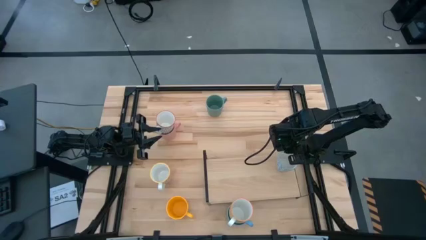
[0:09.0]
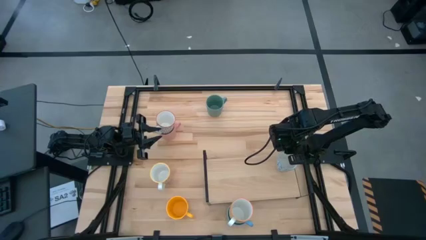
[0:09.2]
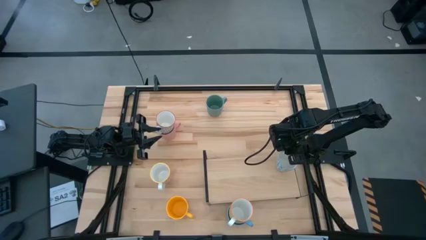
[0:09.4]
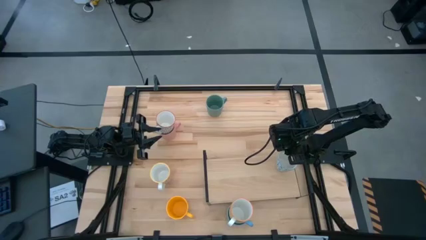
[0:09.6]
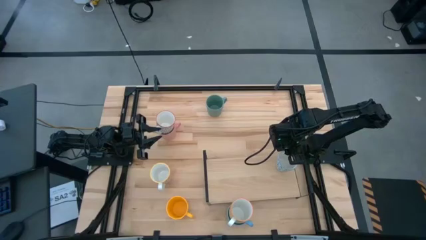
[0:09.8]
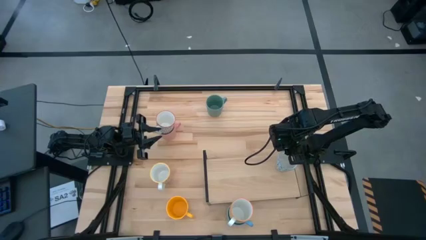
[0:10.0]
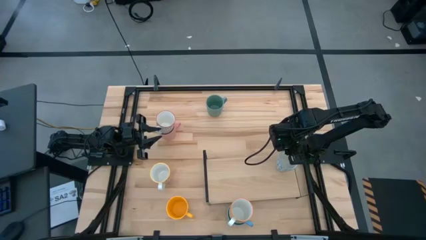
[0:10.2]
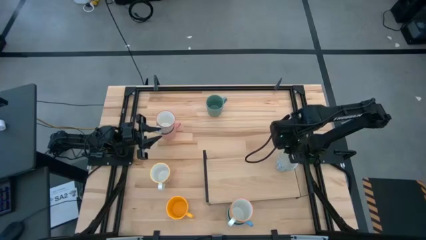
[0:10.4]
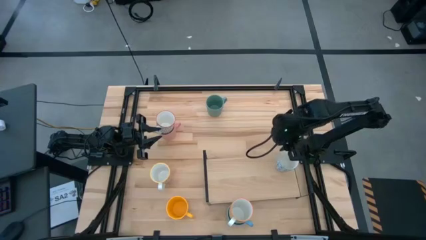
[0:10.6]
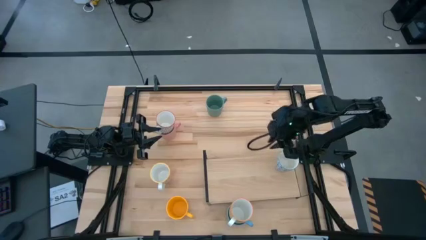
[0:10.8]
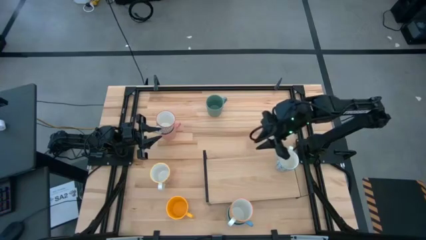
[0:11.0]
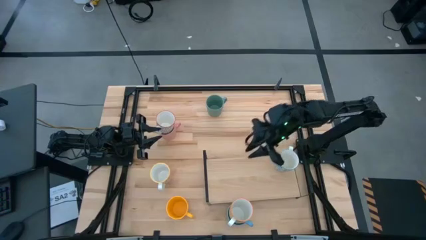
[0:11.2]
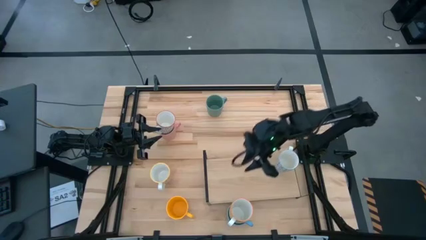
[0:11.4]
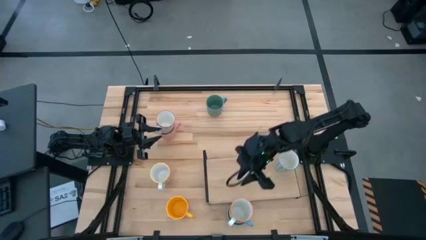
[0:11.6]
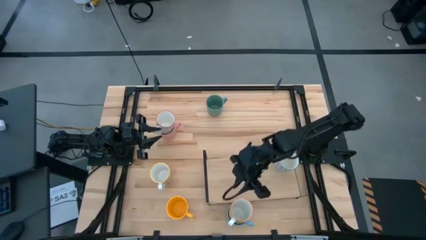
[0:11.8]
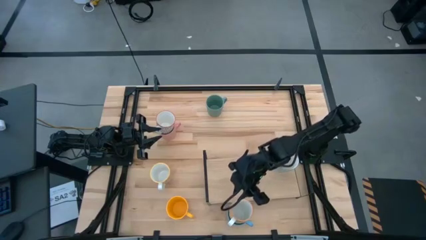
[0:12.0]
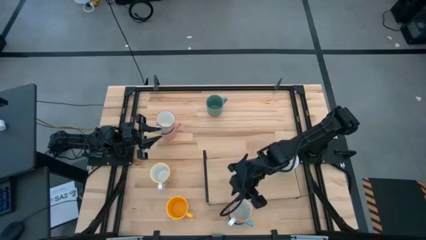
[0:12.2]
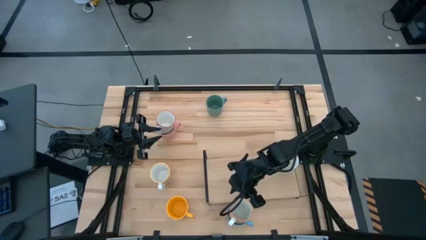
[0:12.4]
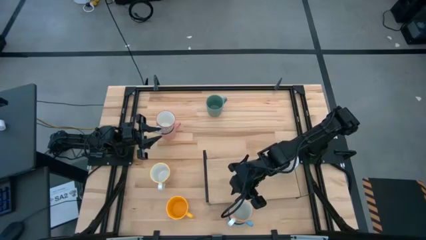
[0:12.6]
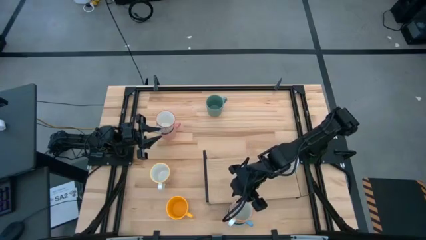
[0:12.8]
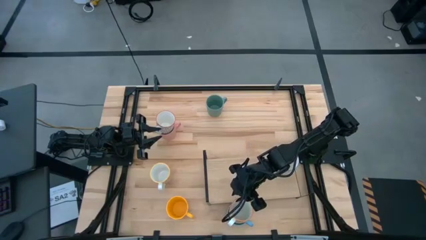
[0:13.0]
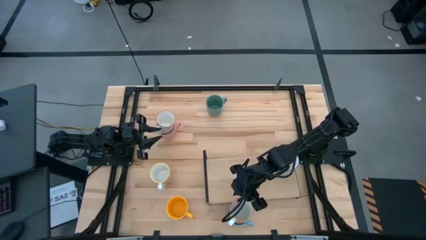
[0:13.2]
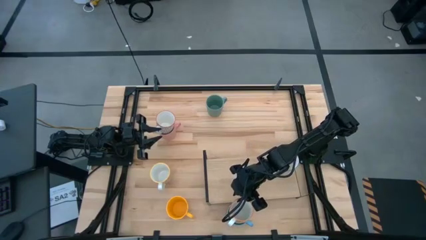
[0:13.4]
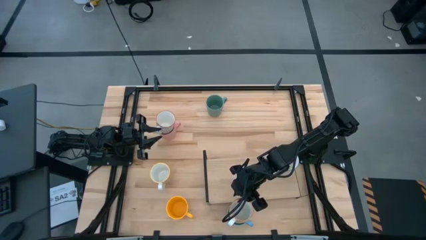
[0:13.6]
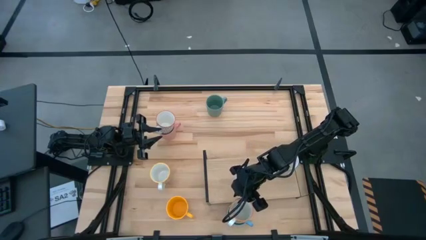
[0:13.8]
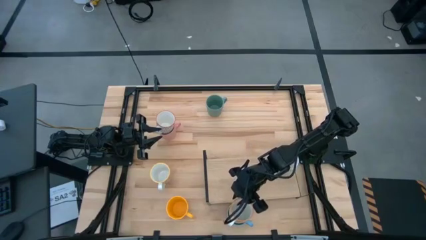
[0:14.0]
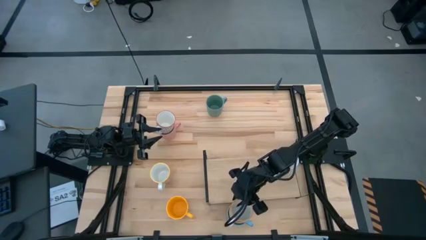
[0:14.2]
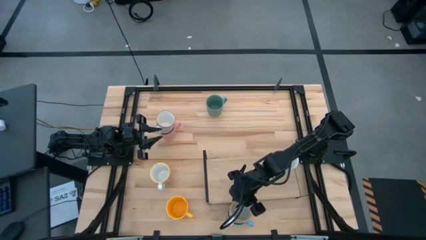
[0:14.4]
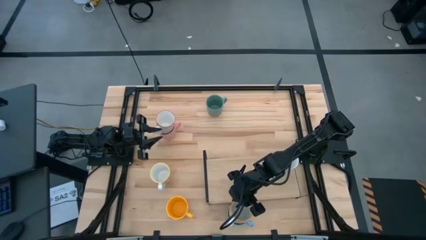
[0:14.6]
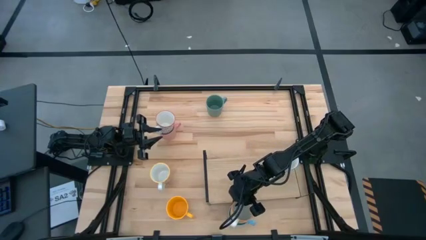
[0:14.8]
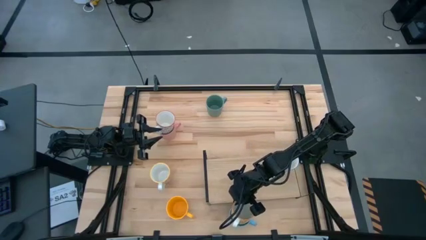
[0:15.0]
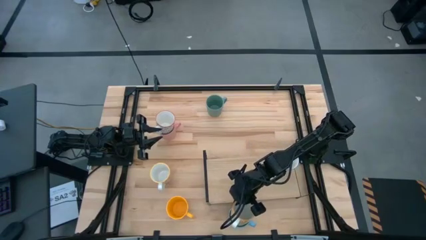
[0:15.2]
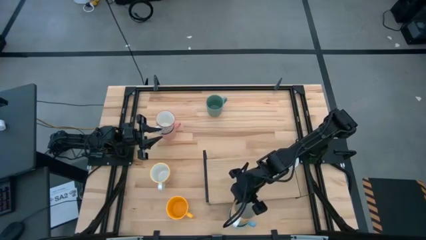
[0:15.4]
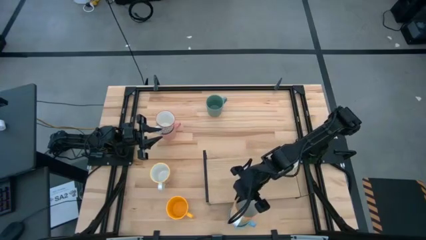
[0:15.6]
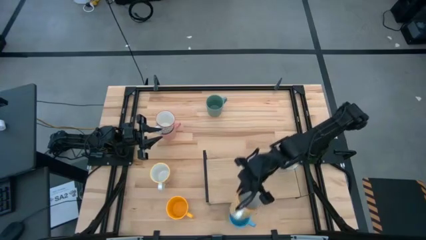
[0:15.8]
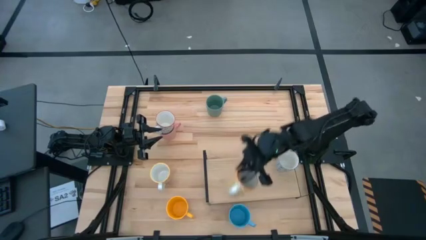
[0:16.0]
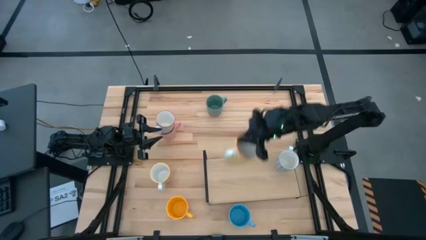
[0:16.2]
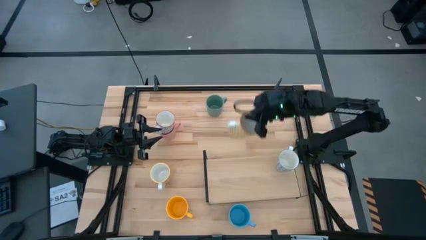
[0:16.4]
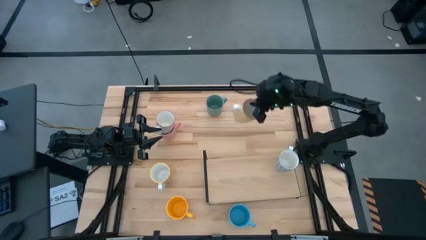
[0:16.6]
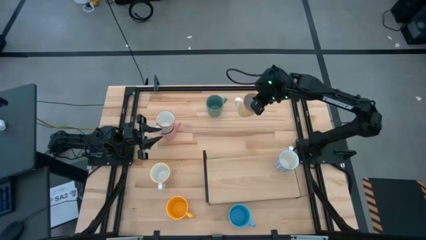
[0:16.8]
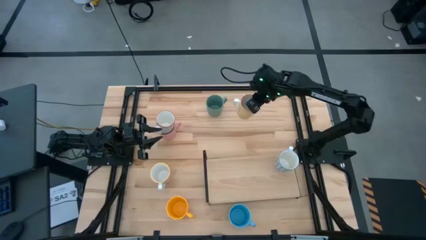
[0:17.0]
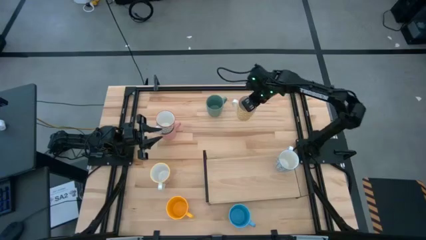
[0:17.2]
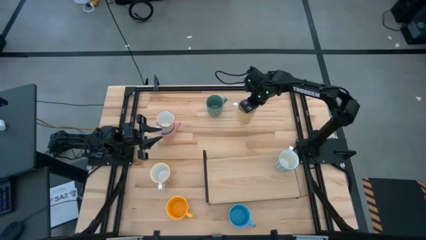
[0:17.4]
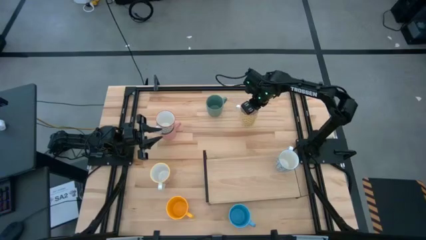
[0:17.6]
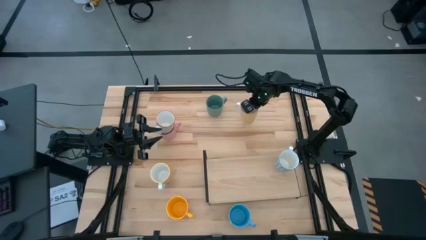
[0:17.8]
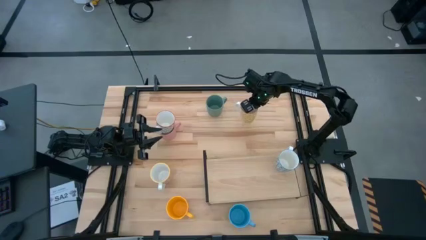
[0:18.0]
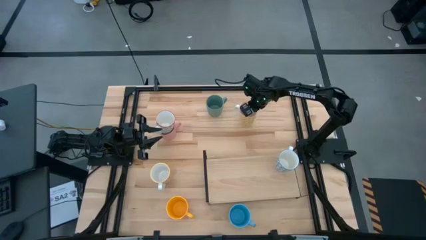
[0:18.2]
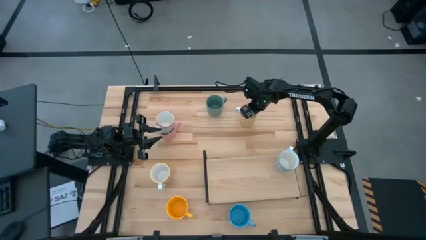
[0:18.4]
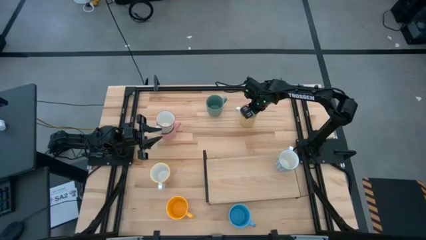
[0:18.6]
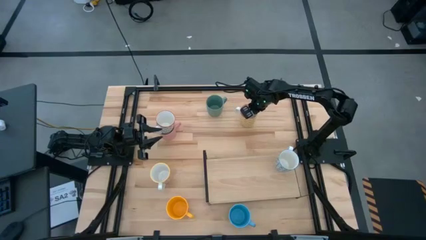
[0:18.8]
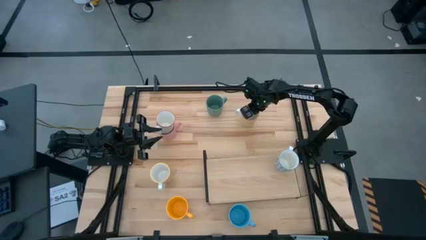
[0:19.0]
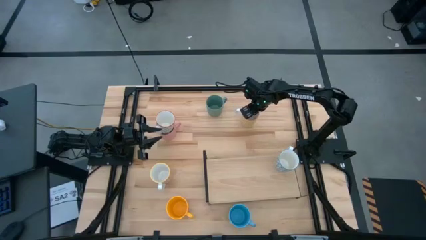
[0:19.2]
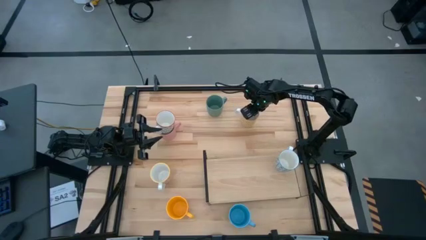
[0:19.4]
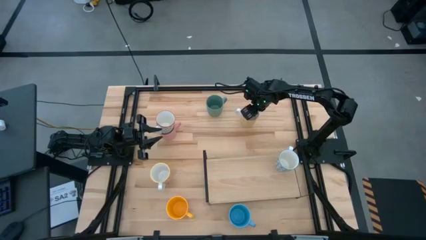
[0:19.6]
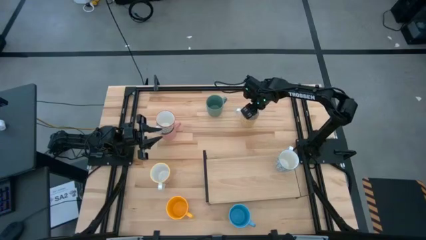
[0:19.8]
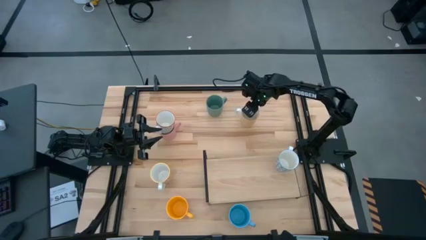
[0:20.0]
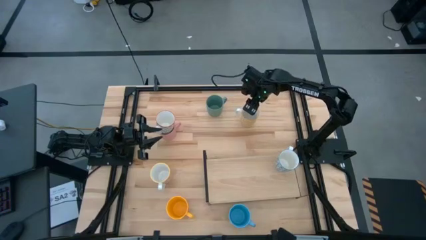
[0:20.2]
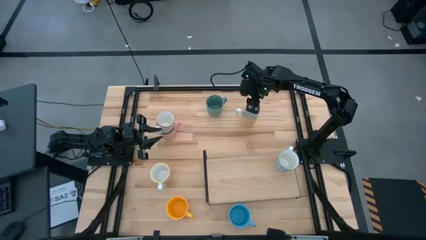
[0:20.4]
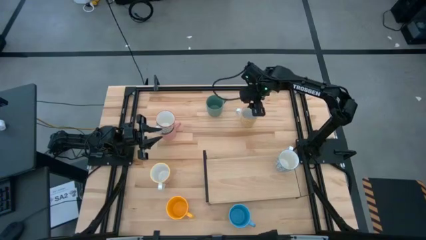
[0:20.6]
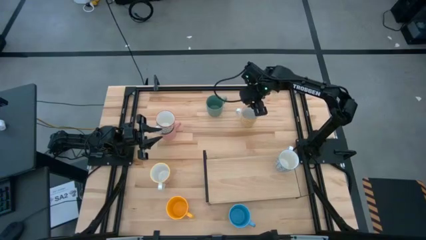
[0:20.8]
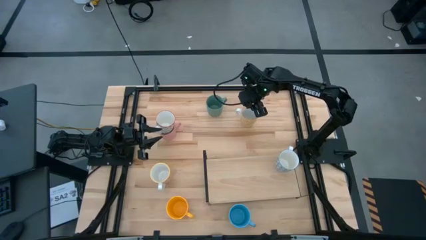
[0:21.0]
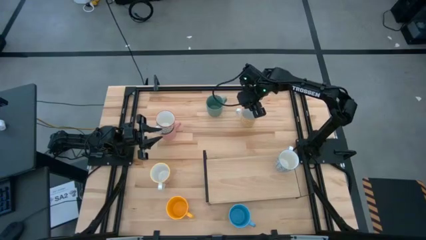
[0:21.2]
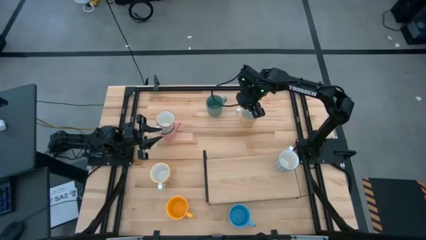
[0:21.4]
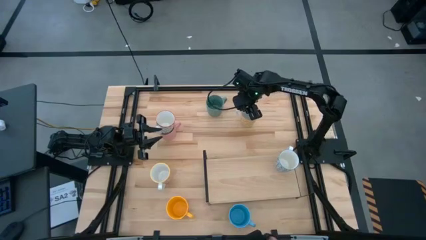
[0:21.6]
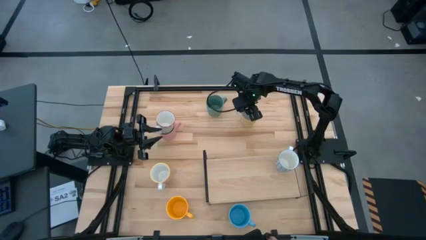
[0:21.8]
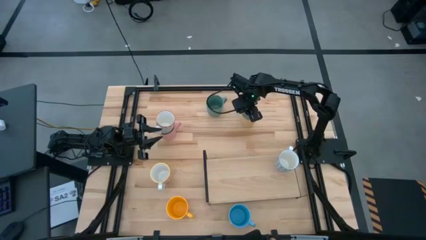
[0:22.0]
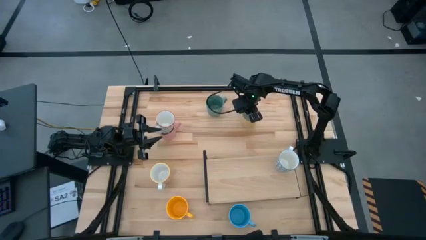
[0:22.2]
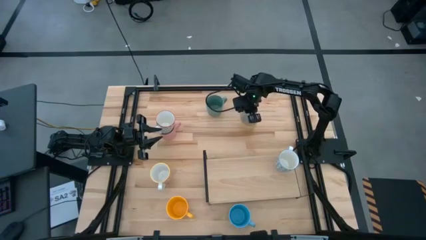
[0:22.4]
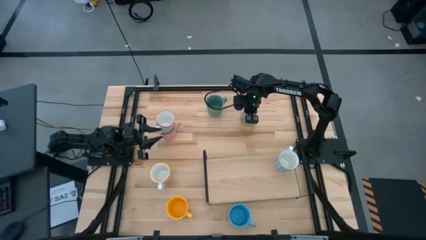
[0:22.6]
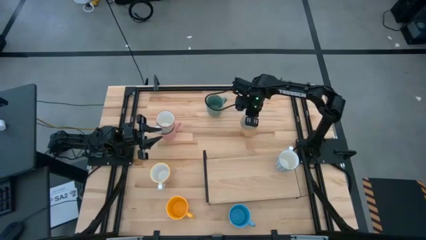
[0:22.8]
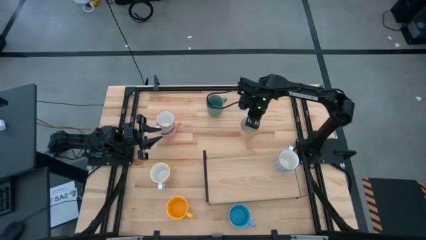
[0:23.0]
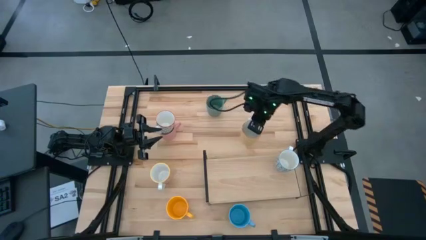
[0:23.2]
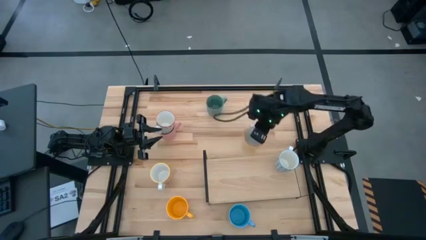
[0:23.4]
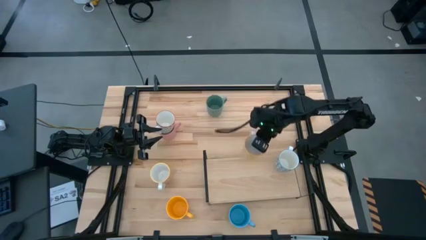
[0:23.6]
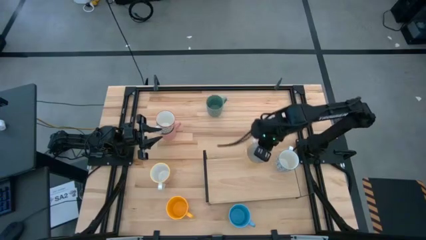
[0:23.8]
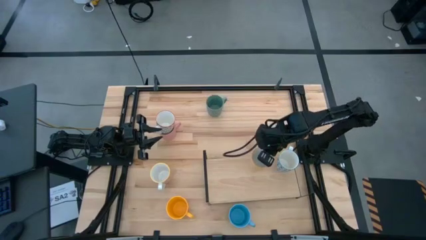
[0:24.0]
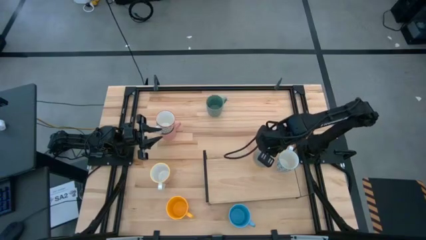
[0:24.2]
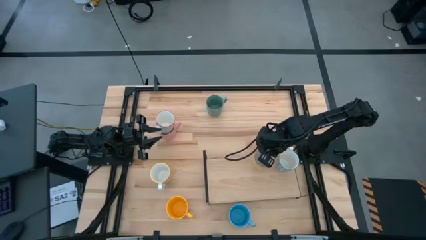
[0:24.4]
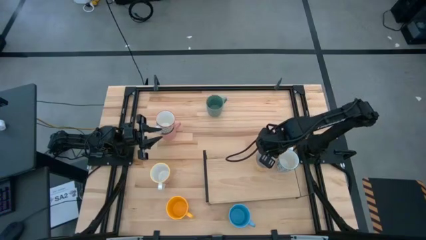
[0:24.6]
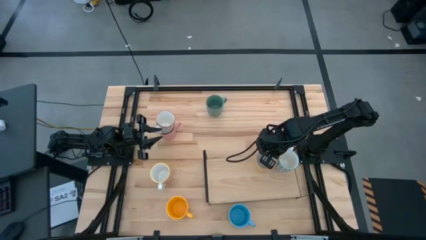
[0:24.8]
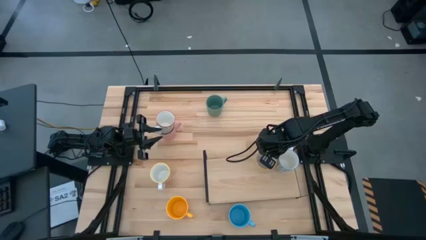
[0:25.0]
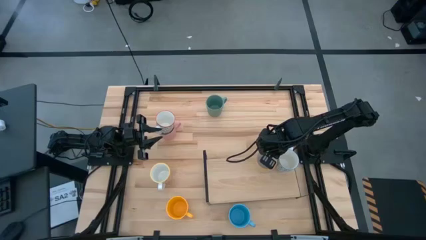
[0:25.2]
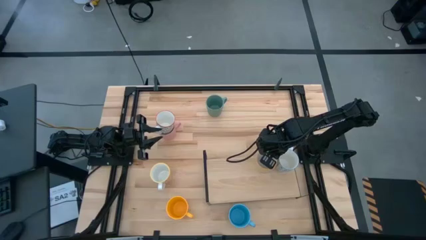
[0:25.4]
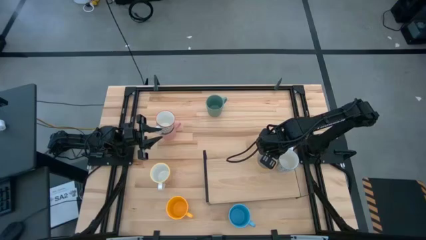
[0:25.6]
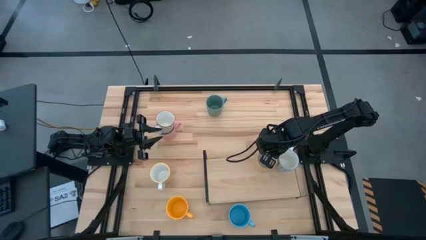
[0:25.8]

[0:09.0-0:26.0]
Task: Place coffee mugs
Put the yellow patterned mug on the shelf
